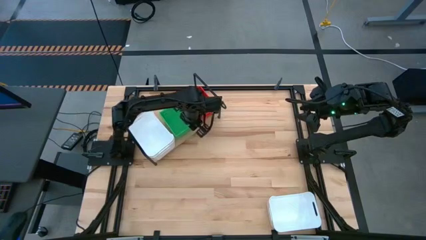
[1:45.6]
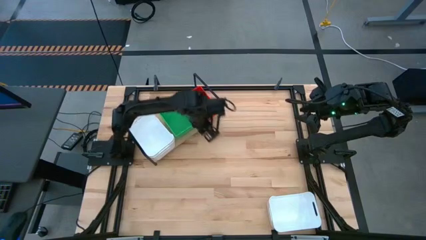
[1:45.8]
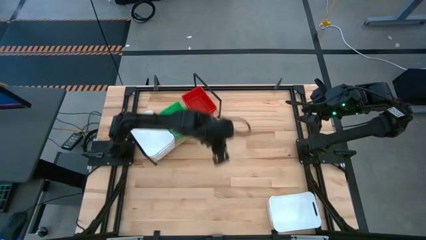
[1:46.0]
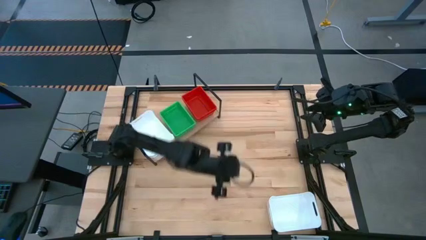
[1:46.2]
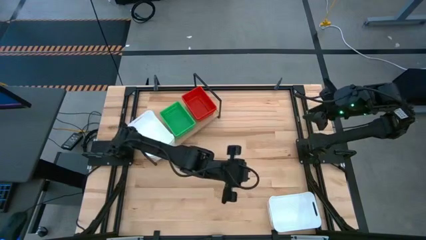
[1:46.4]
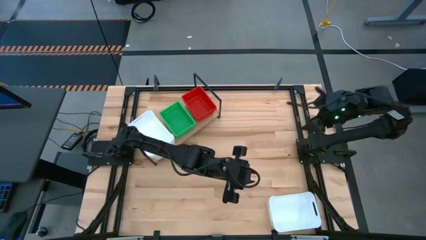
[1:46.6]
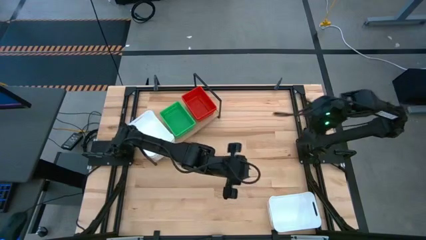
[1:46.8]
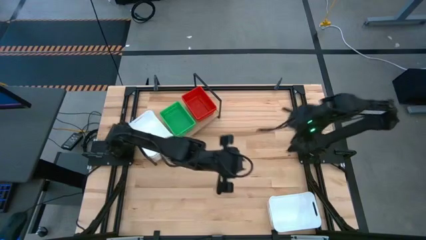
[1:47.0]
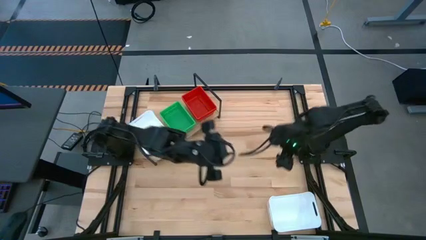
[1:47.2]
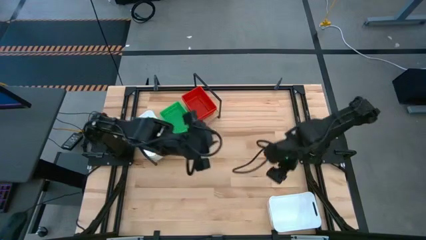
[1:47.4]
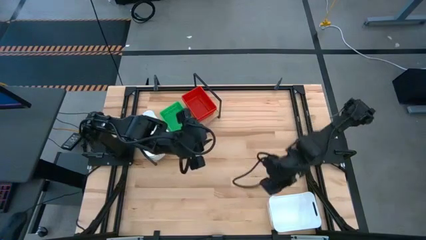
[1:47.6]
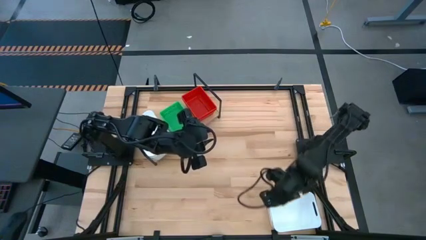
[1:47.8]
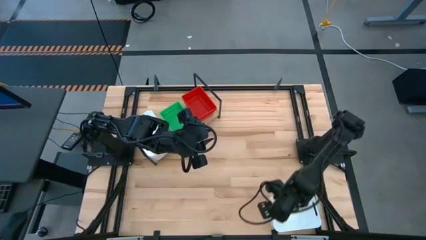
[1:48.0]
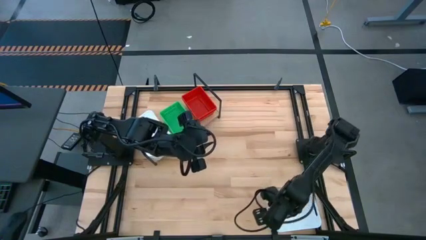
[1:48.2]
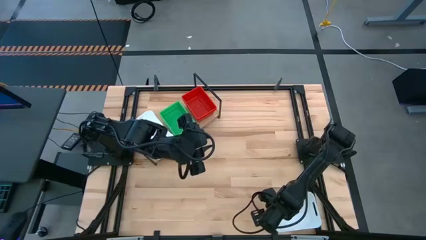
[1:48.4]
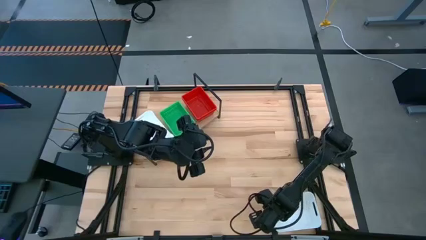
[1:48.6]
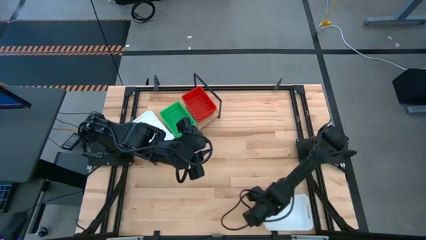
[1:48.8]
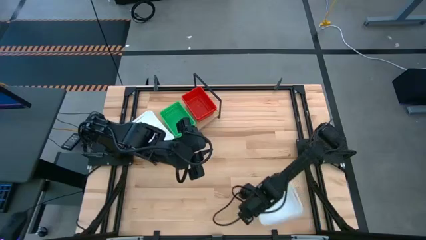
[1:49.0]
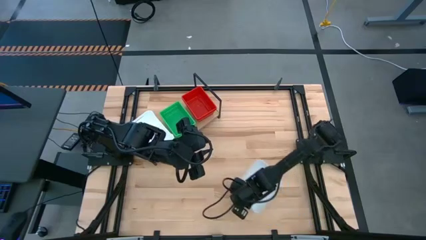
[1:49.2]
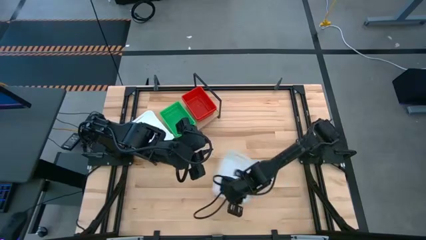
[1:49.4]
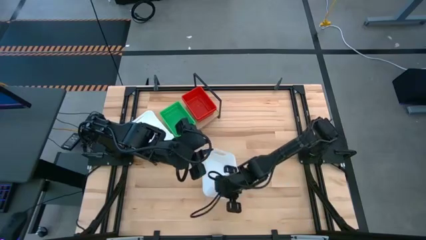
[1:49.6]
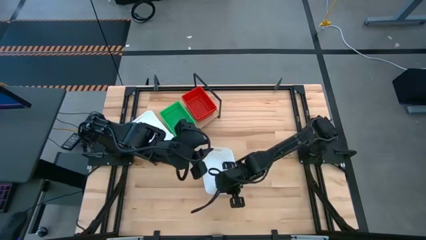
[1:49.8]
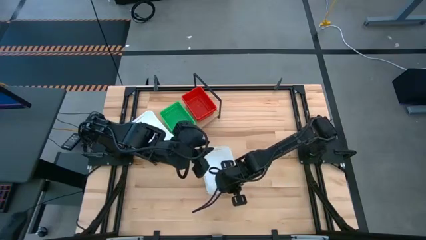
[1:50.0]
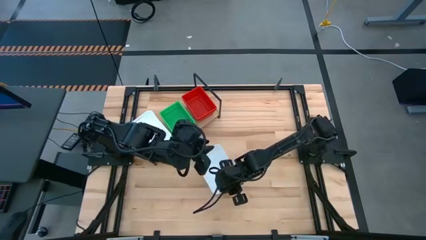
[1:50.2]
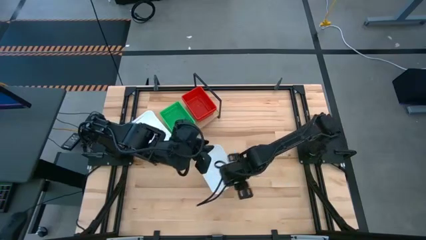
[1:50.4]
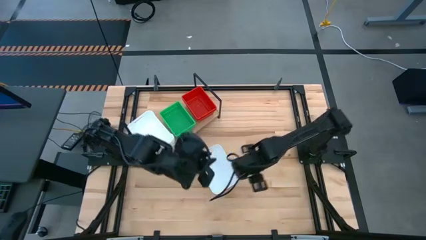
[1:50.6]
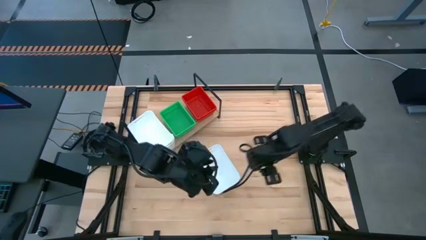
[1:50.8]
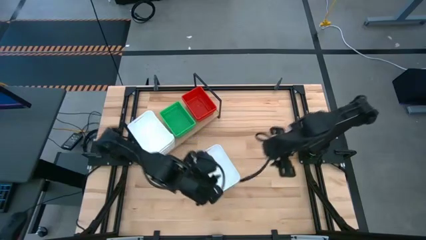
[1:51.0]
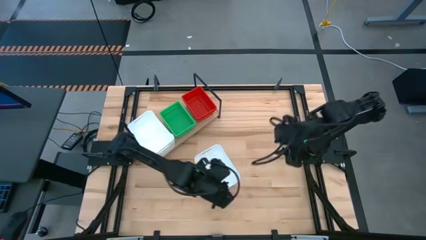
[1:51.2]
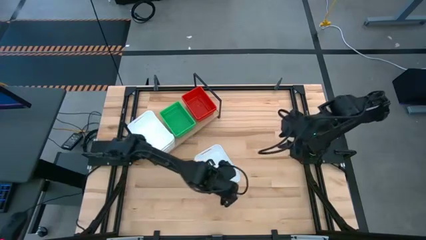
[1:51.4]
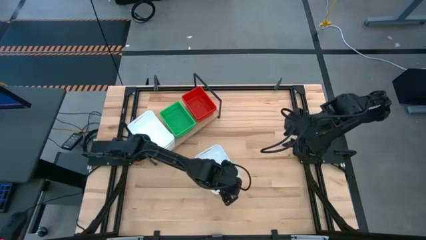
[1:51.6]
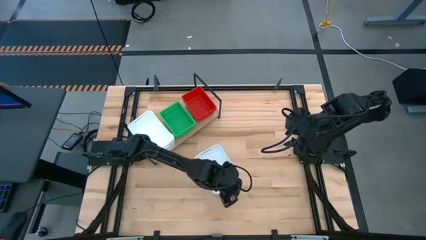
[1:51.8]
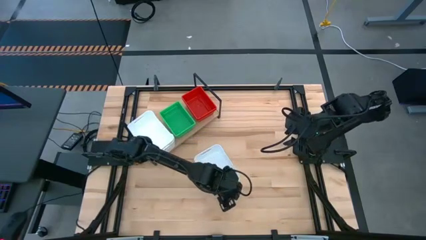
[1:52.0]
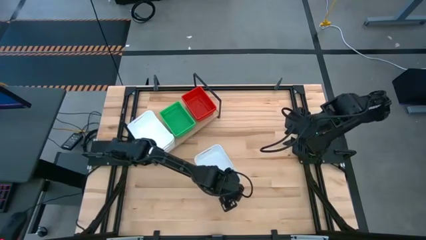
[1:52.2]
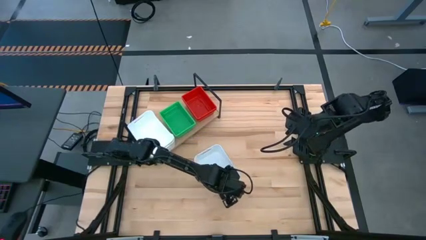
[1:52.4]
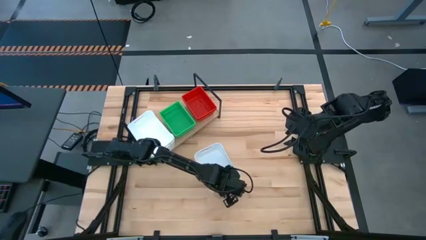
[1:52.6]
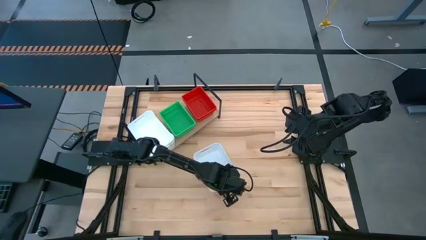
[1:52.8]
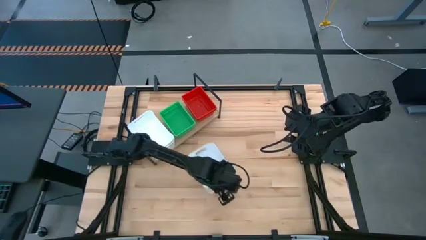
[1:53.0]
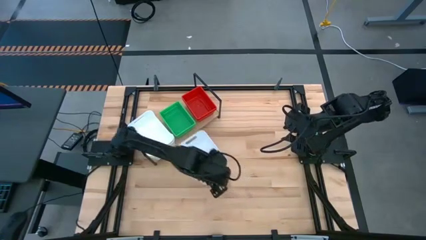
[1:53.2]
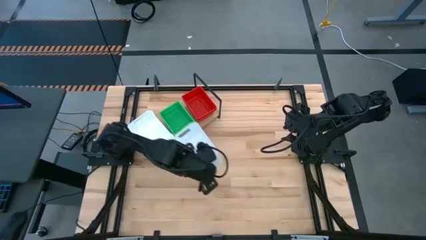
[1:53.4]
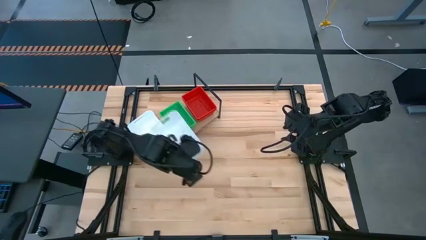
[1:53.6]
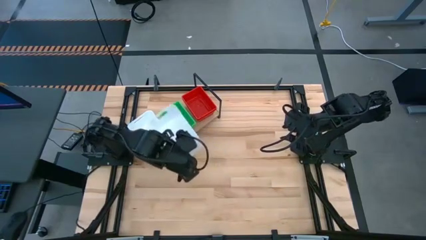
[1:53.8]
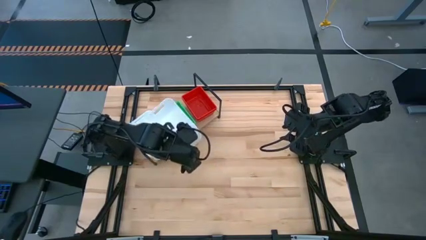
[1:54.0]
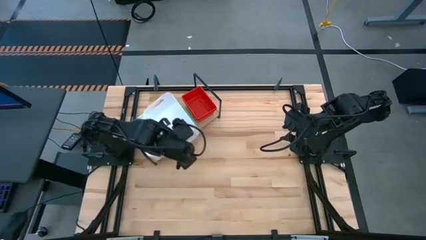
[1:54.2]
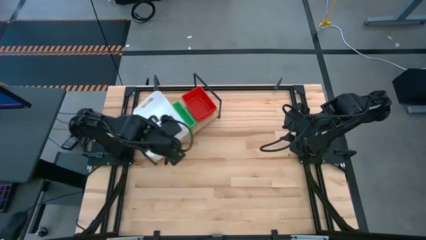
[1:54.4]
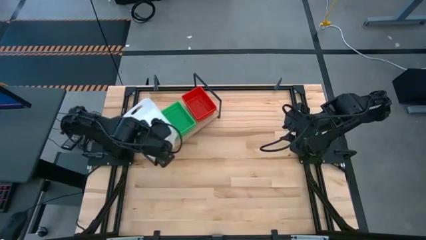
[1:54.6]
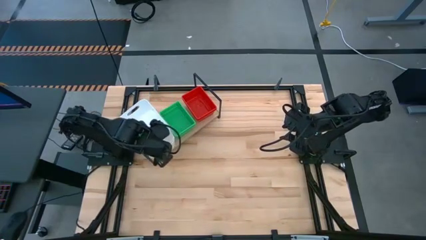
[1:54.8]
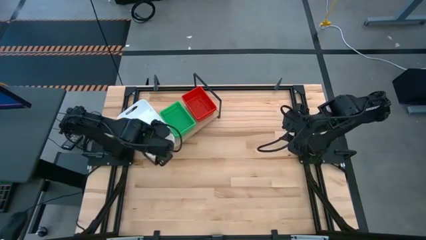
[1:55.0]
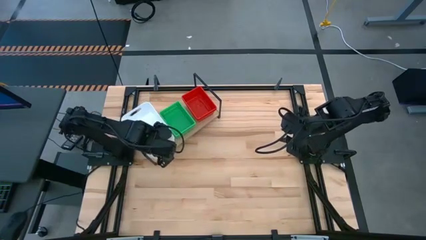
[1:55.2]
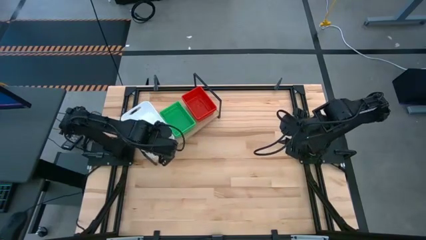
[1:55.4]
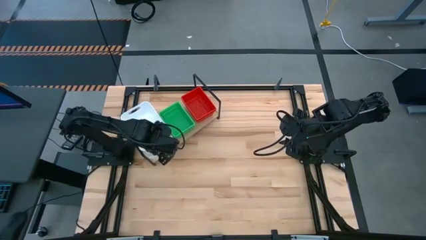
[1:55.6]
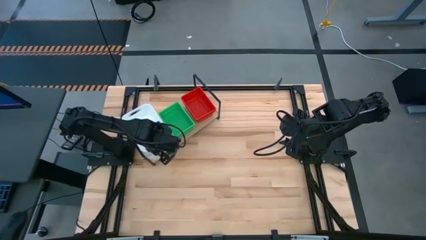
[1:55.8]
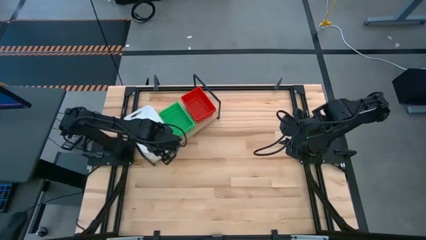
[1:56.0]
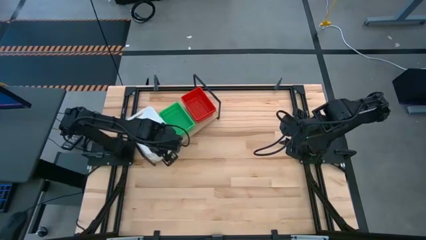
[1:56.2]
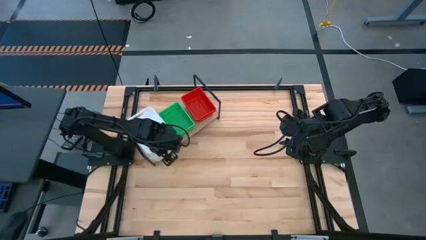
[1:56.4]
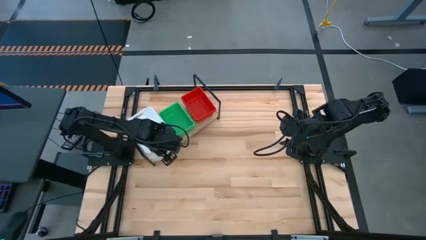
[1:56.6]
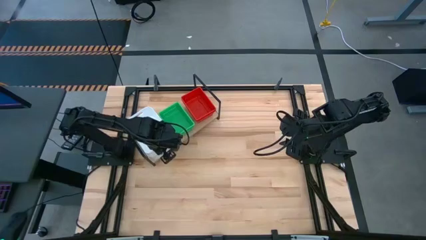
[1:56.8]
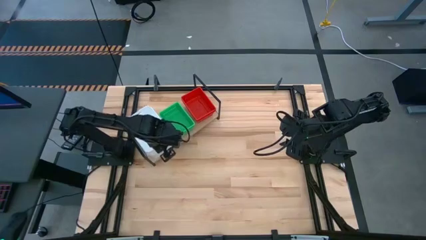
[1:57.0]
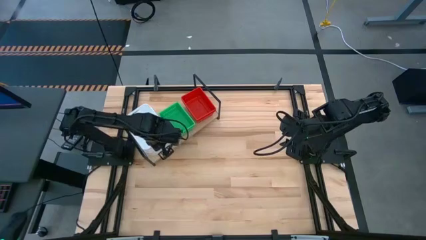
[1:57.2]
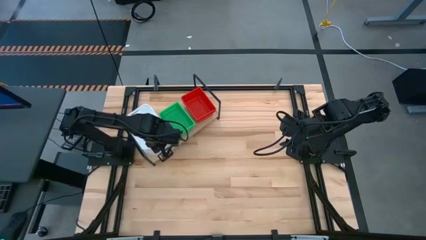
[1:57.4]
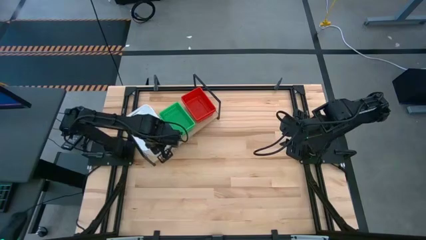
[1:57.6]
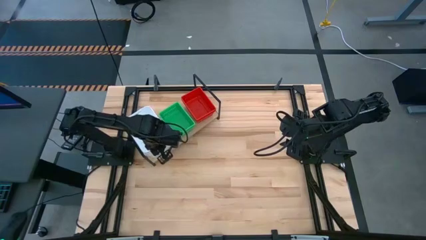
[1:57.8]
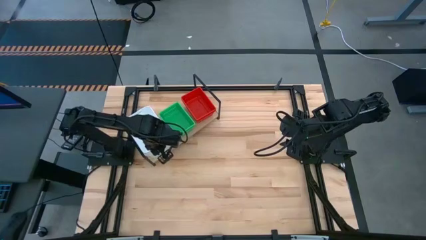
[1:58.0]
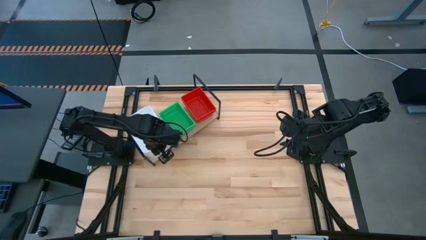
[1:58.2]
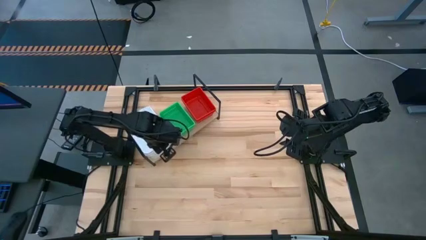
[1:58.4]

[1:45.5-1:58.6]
Task: Stack baskets on shelf by color
Stack the white bin on top of the white bin on the shelf
